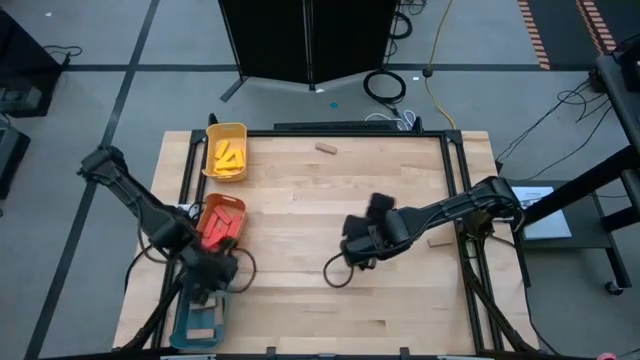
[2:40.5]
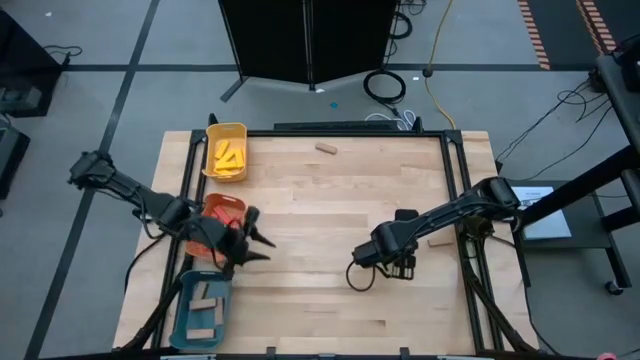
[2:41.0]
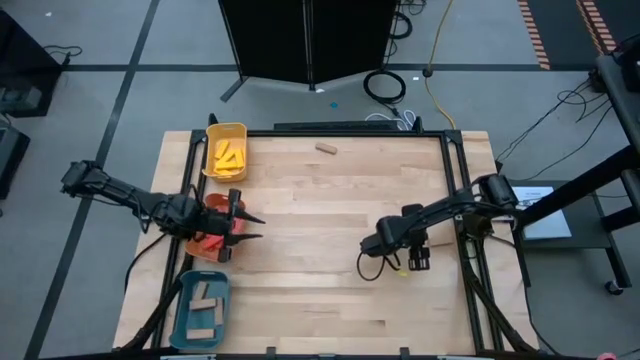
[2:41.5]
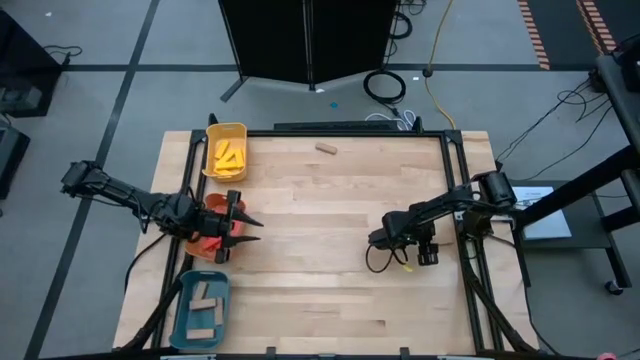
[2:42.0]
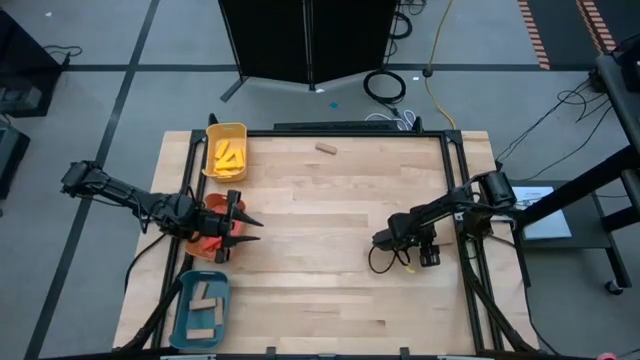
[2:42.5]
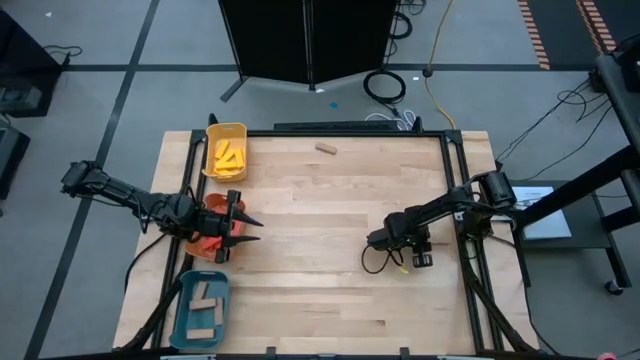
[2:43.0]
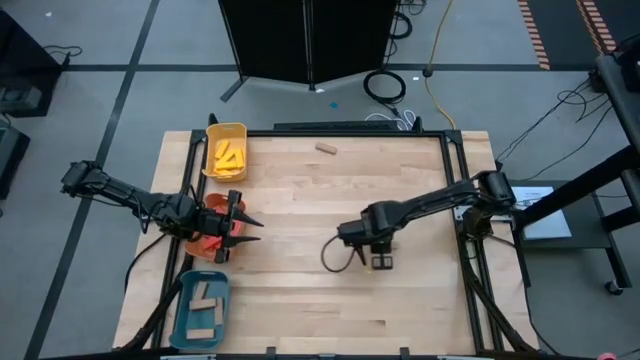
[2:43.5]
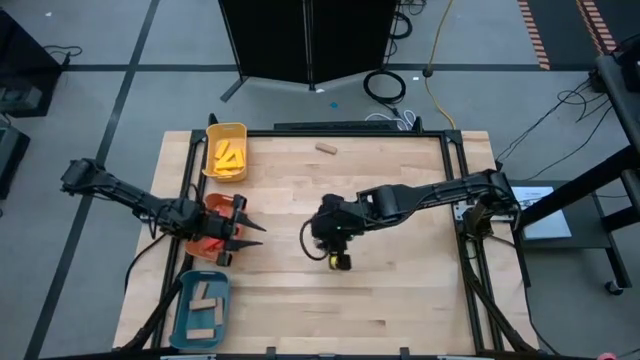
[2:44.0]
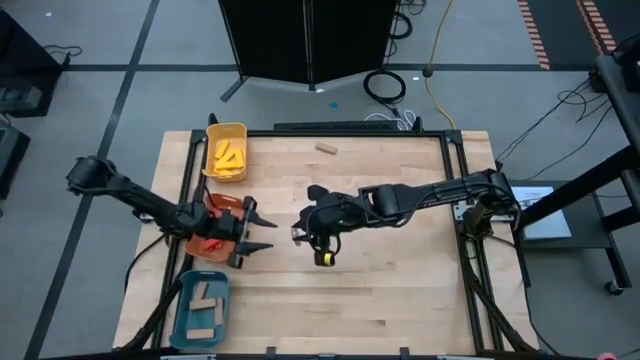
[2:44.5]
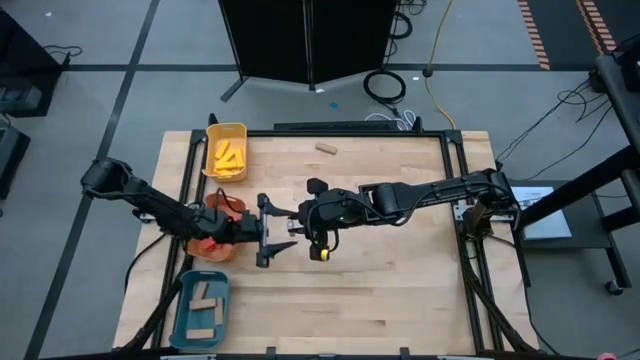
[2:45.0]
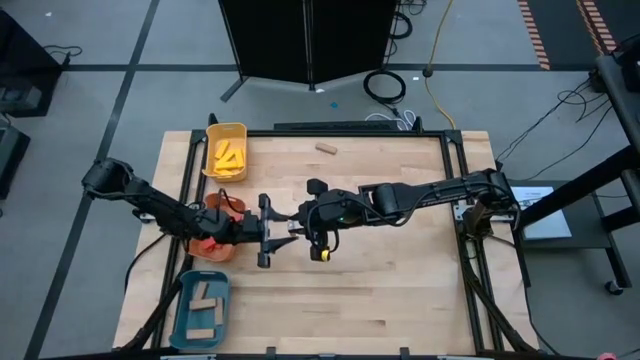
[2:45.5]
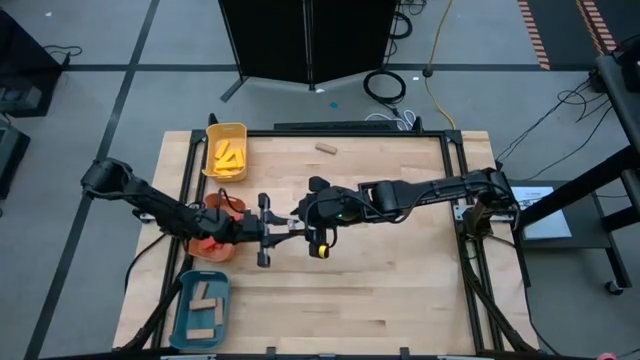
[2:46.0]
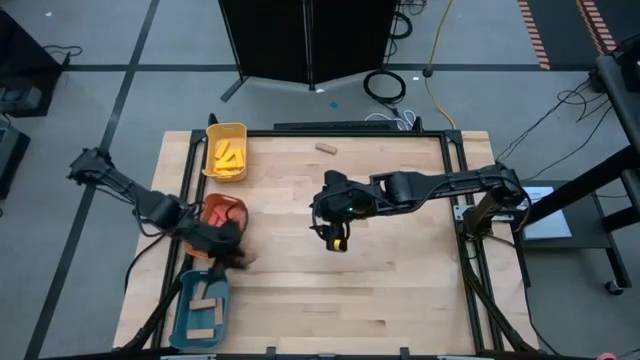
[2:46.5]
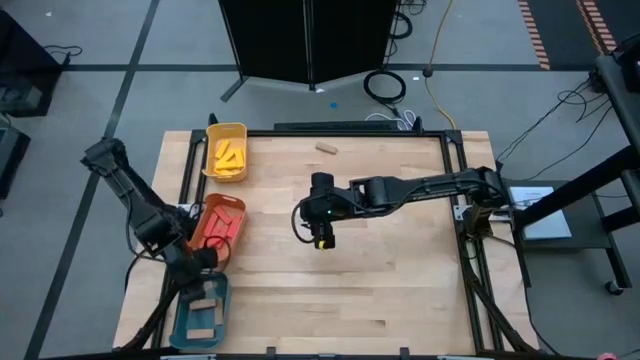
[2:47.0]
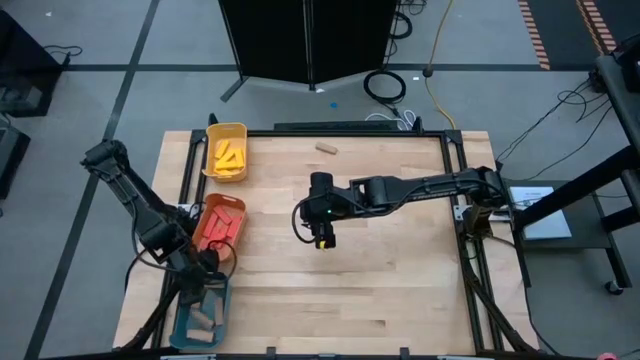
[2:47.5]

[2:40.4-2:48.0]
Task: Sort blocks
Put the bottom brown block in the blue bin

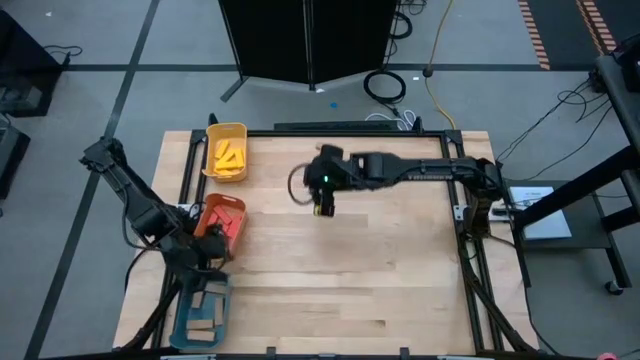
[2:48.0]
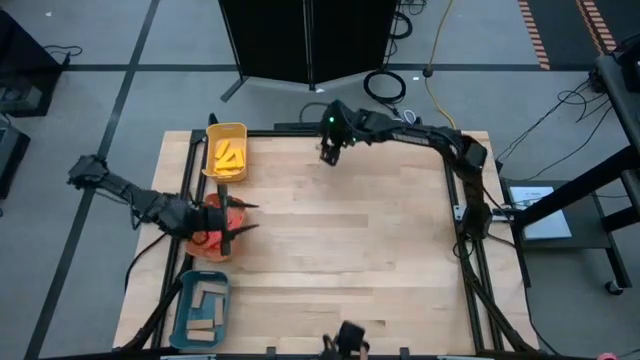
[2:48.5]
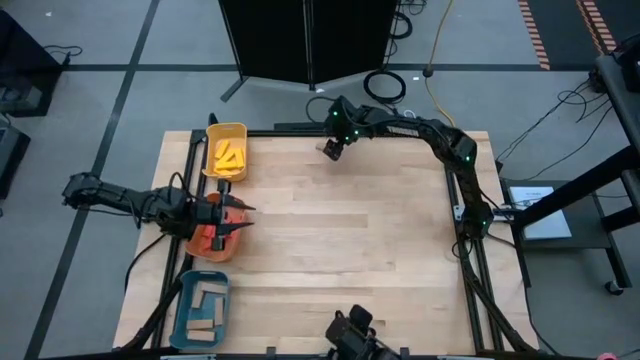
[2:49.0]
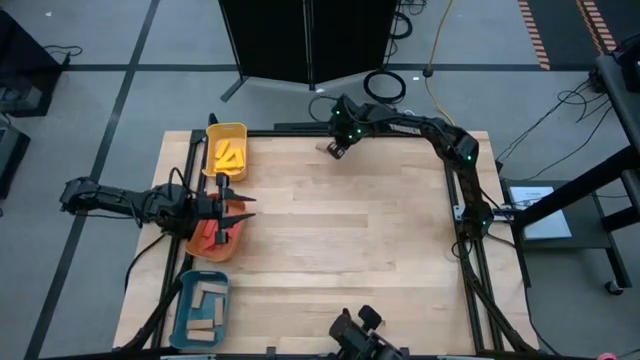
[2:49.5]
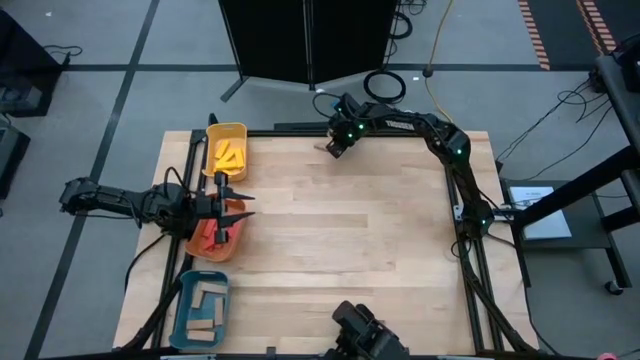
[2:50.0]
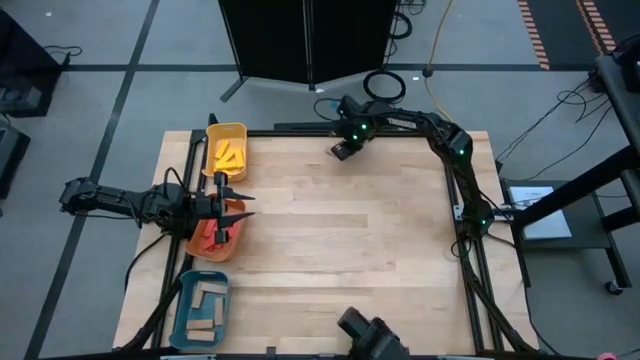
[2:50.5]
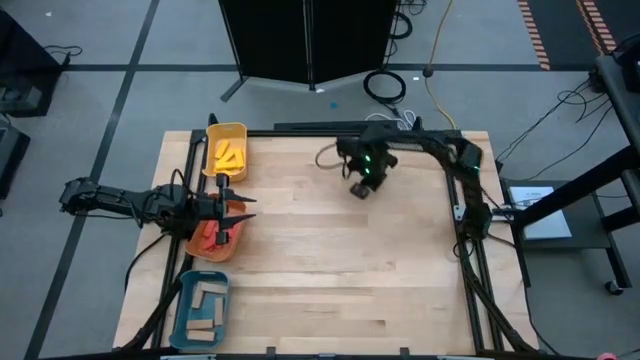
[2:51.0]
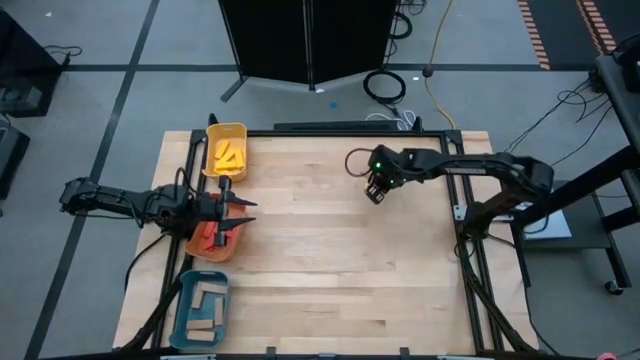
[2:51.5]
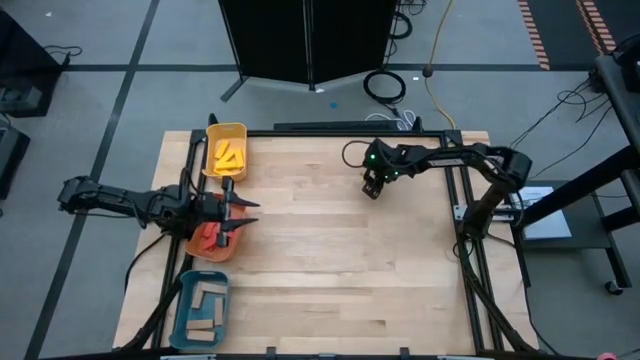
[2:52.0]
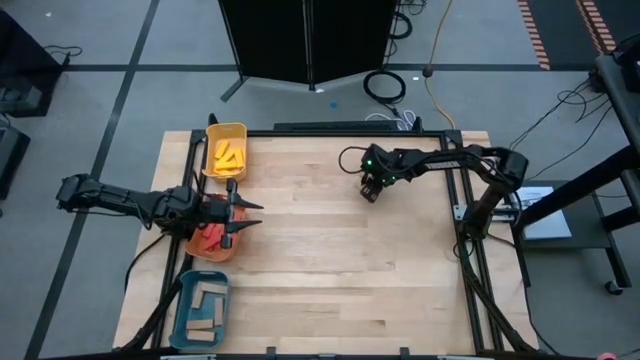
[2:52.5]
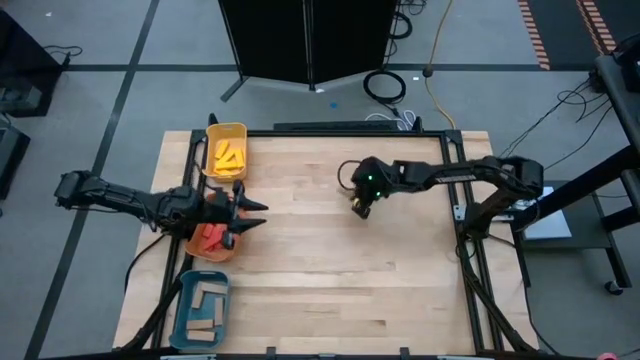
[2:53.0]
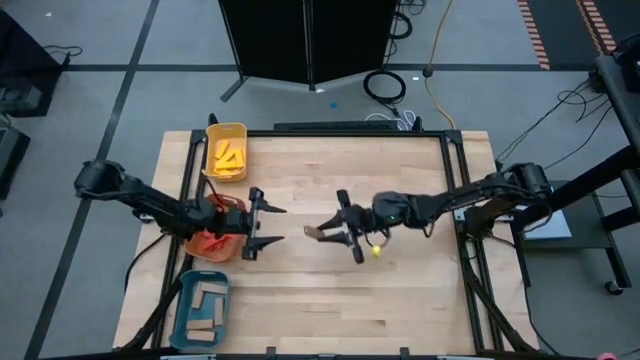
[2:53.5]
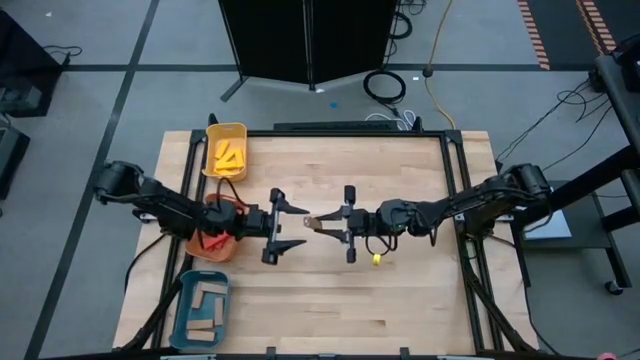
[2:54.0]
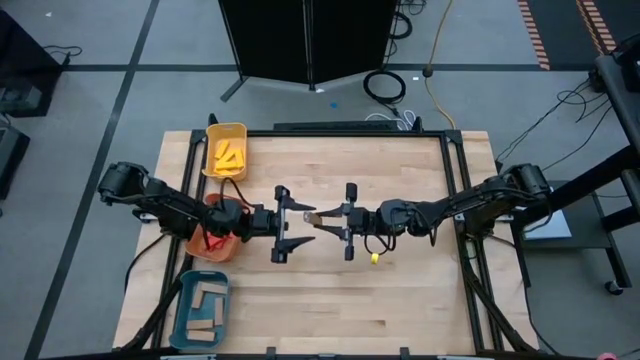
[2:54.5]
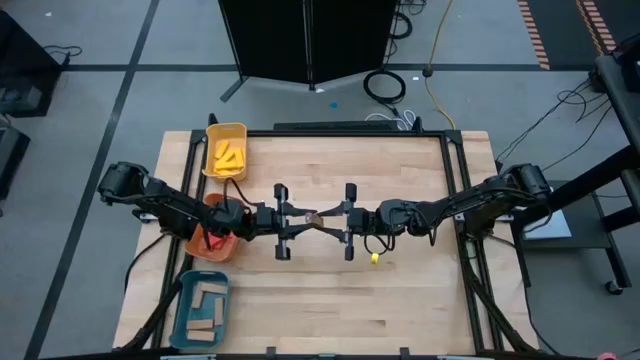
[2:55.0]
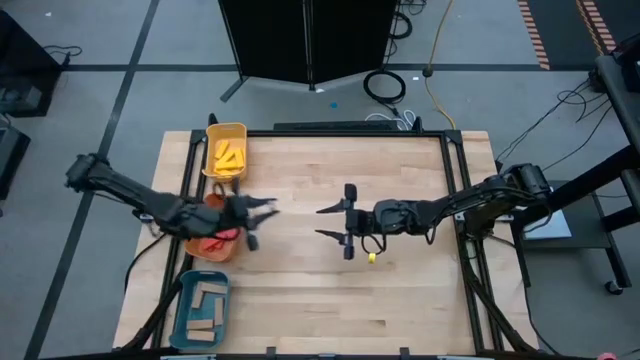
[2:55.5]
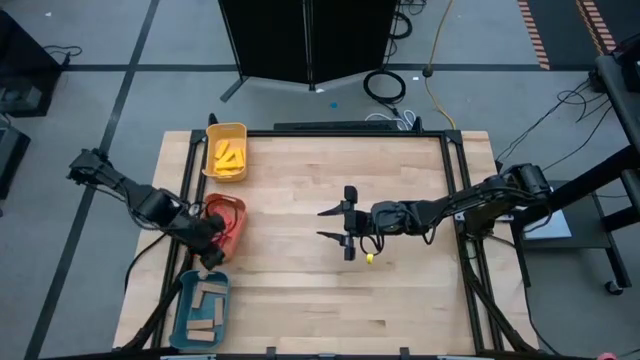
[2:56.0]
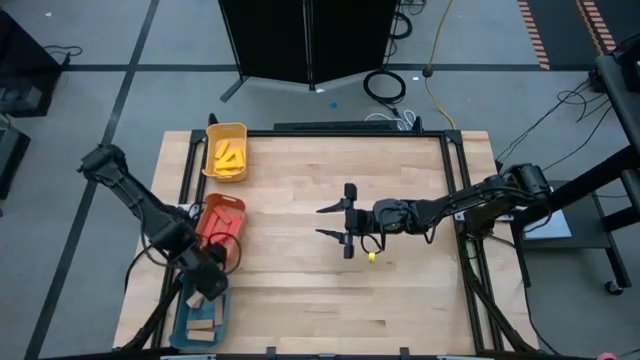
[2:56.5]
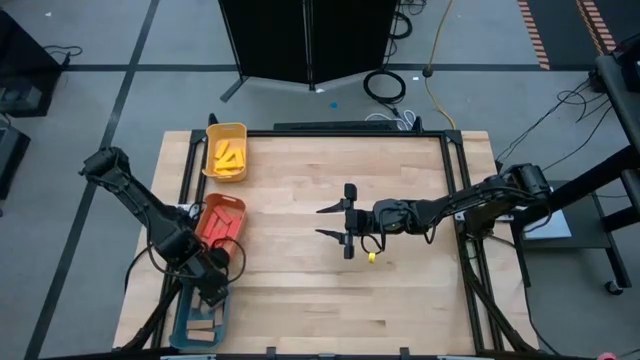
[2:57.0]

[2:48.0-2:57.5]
Put the brown block in the blue bin

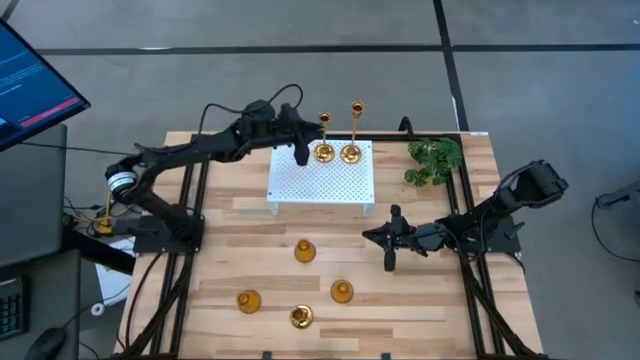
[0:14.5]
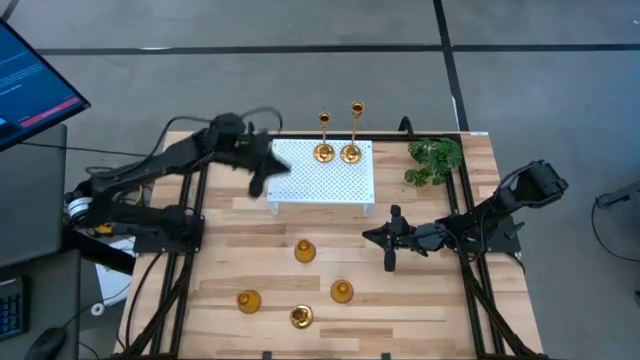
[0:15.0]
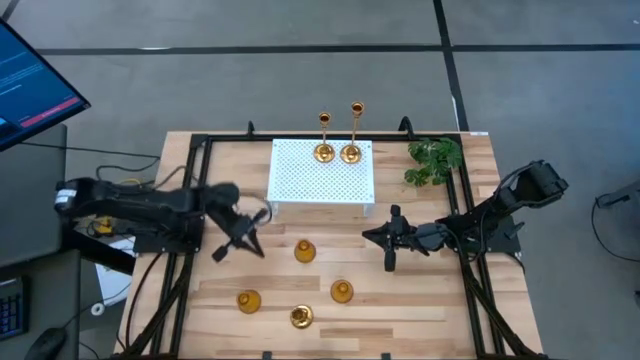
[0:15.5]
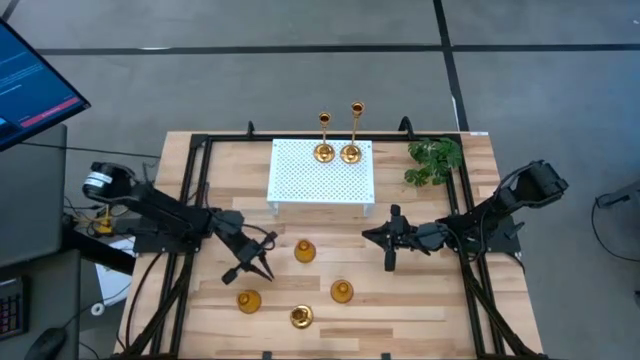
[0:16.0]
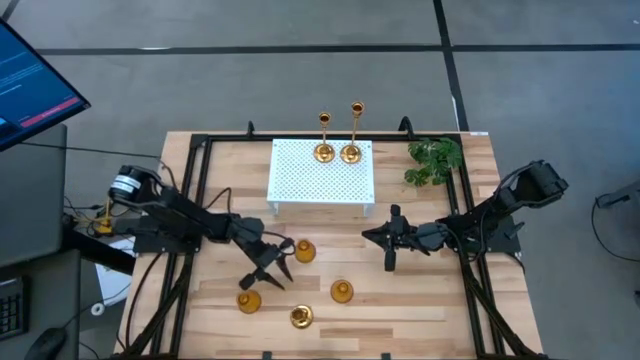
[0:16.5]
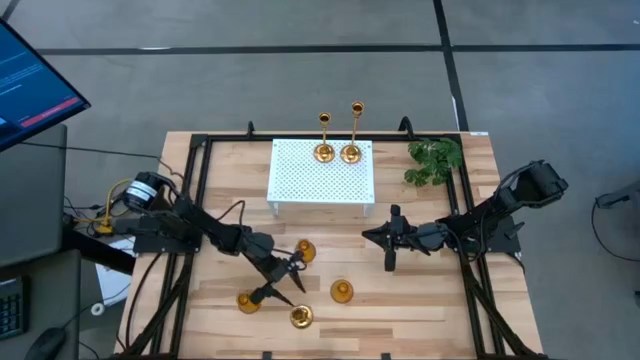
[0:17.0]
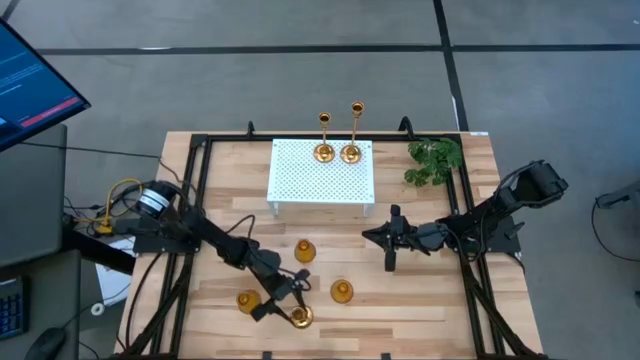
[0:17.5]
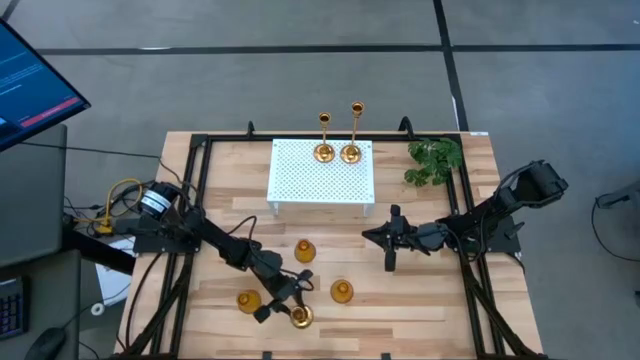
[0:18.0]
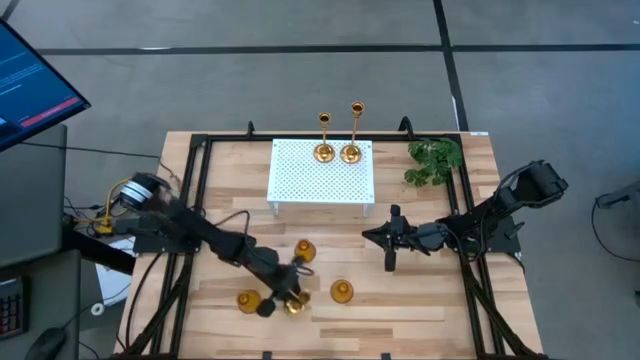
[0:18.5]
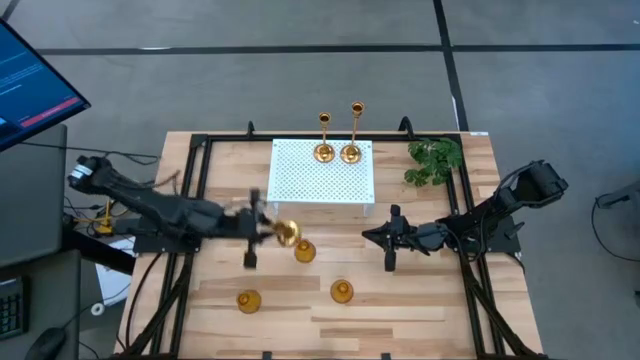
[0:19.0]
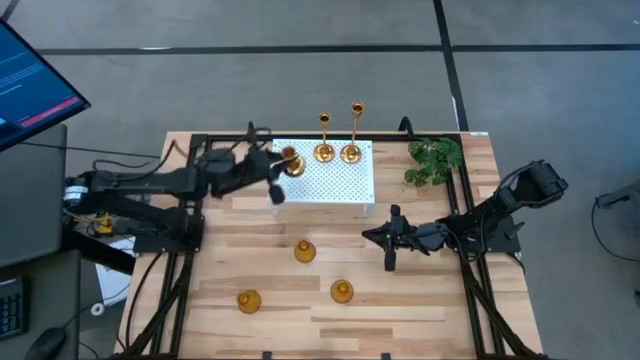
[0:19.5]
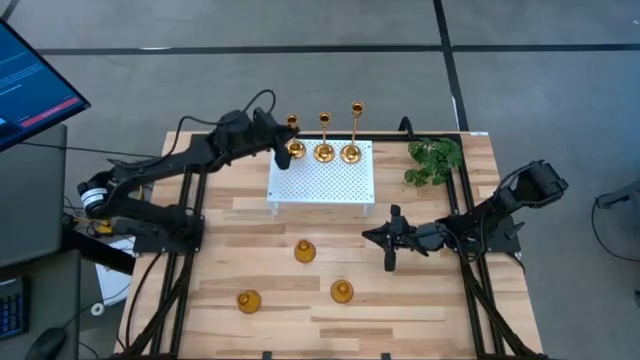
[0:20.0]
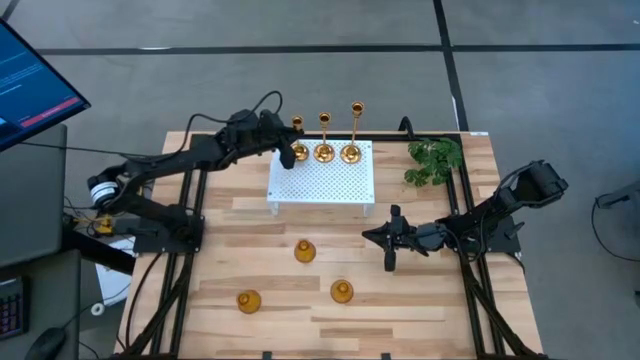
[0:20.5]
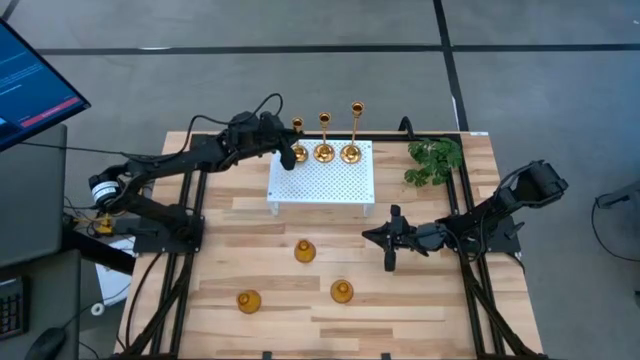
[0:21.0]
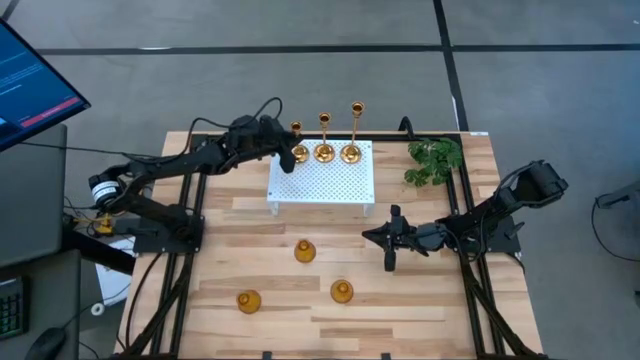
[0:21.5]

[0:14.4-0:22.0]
Task: Pick & Place candle stick holders
Put the gold candle holder on the shelf aligned with the other gold candle holders
